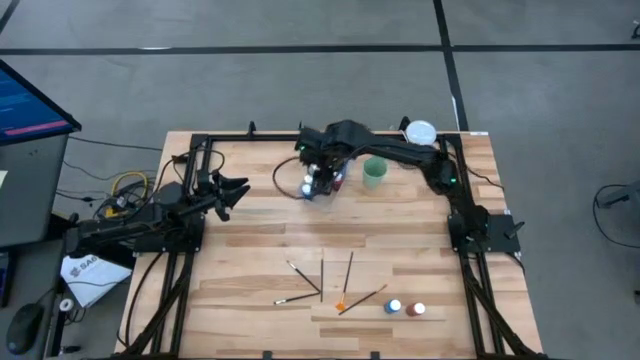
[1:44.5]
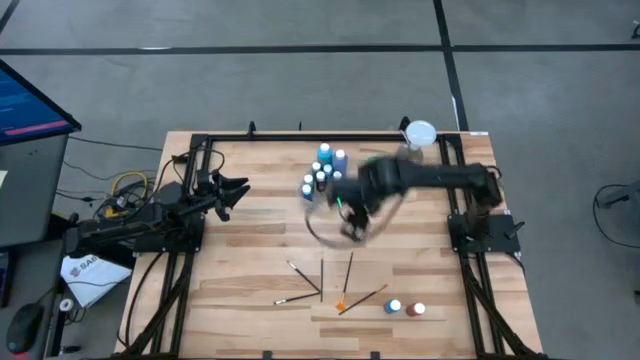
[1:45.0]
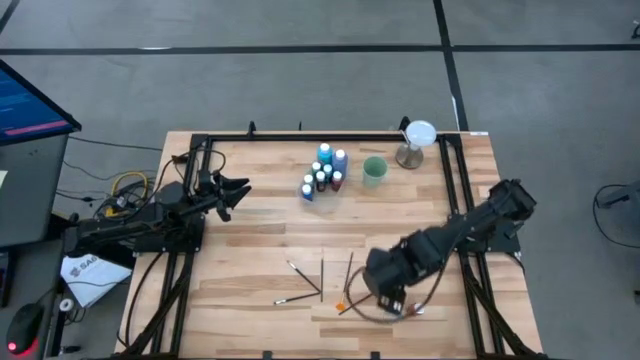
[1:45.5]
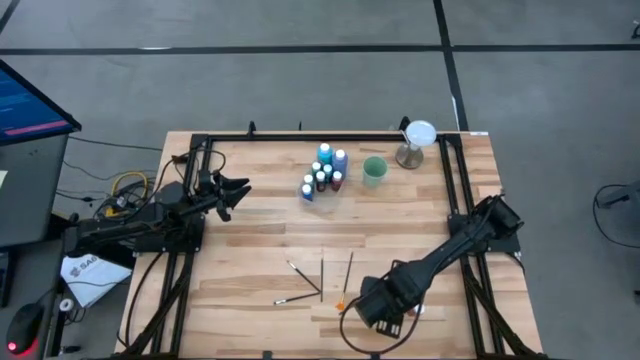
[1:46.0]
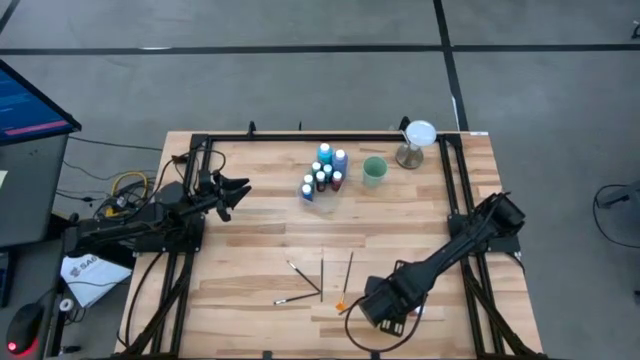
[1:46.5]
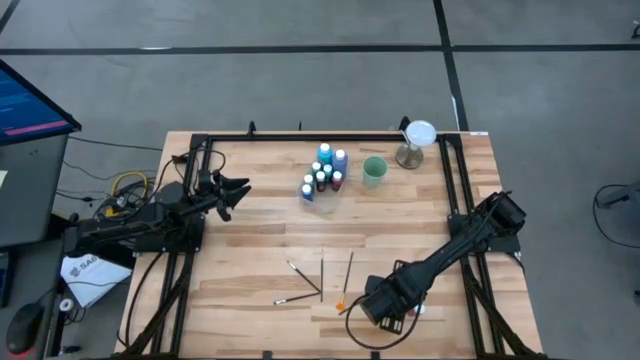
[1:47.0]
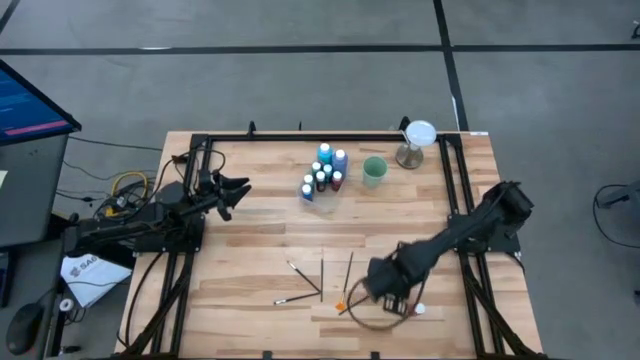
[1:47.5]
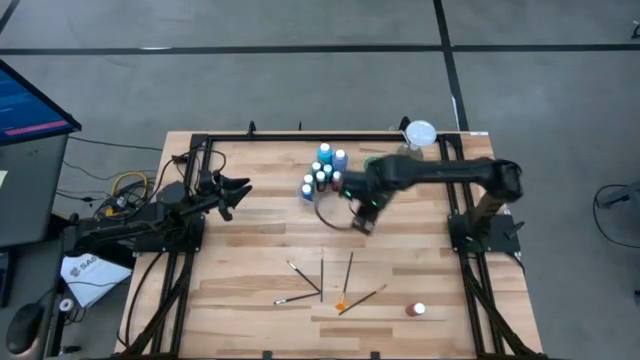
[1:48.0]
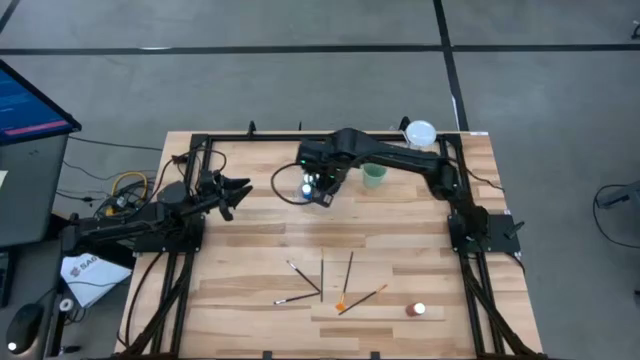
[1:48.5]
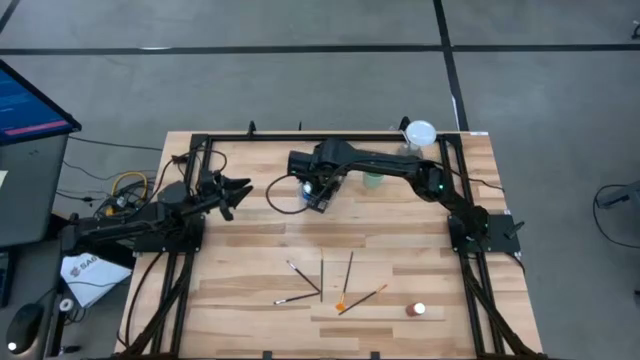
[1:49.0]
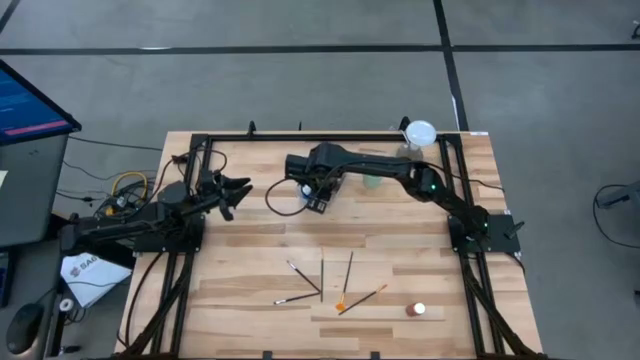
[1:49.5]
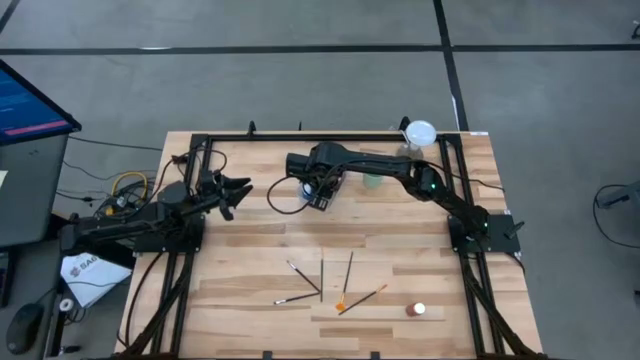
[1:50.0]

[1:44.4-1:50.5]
Task: Pick & Place Paint Supplies
Put the small light blue paint bottle into the transparent bin

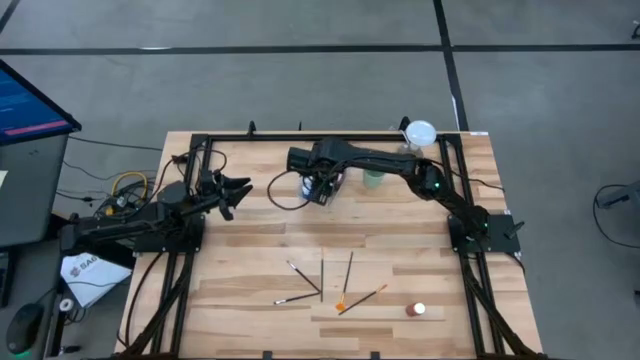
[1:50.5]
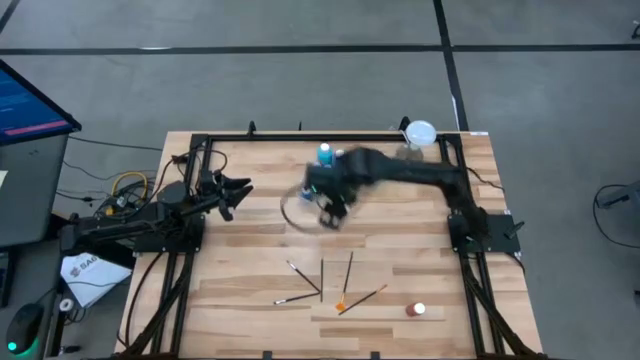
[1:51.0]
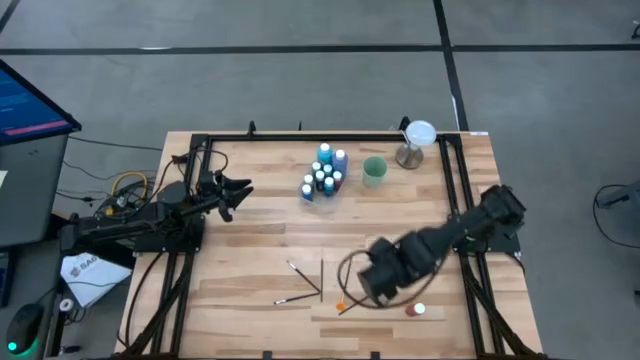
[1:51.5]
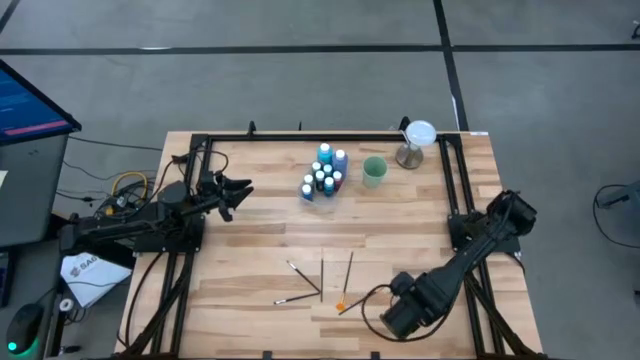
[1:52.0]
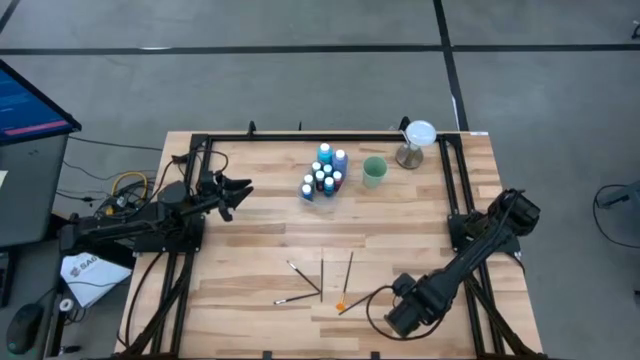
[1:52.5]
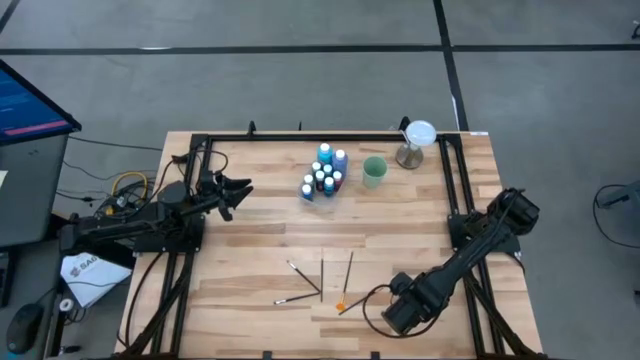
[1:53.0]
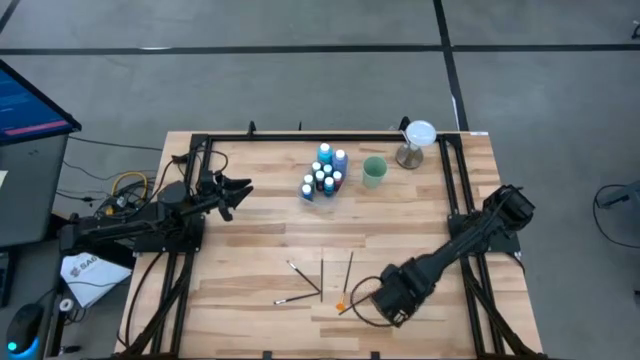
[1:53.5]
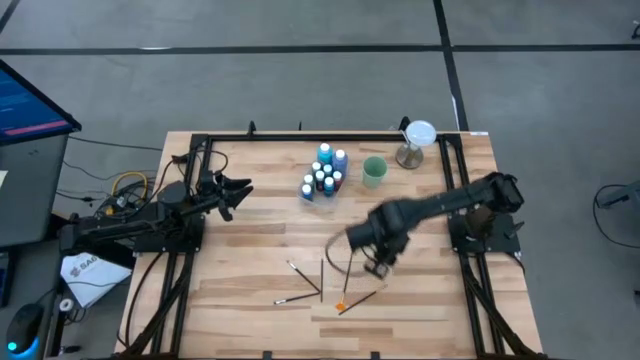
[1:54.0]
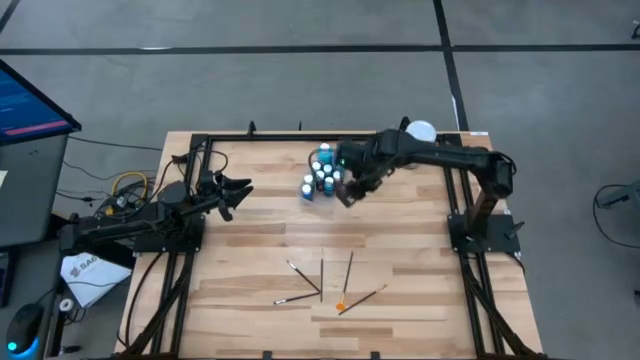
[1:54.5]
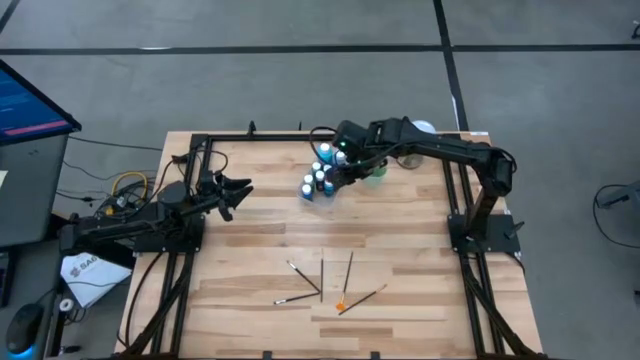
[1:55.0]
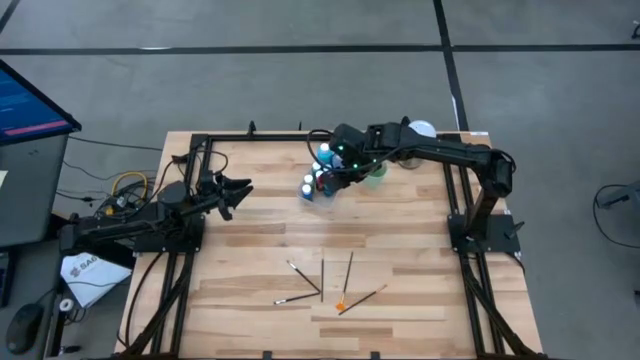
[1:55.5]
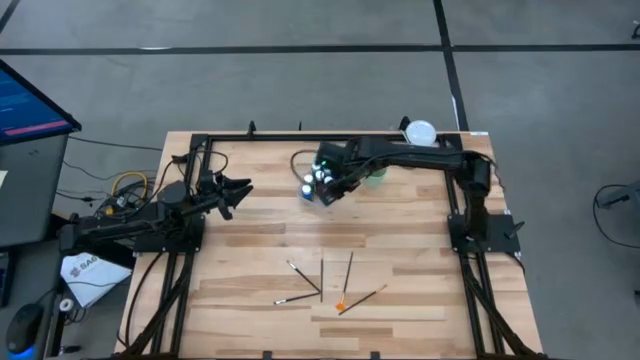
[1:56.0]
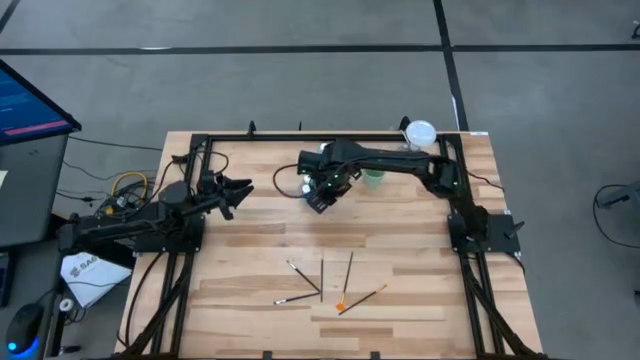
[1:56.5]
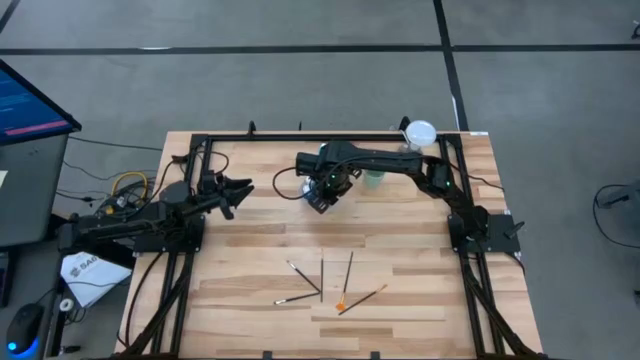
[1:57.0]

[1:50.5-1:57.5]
Put the small red paint bottle into the transparent bin

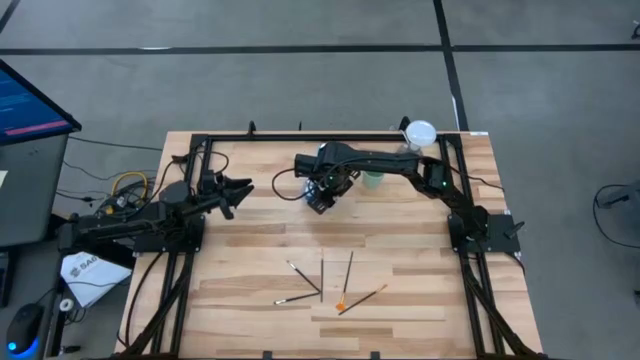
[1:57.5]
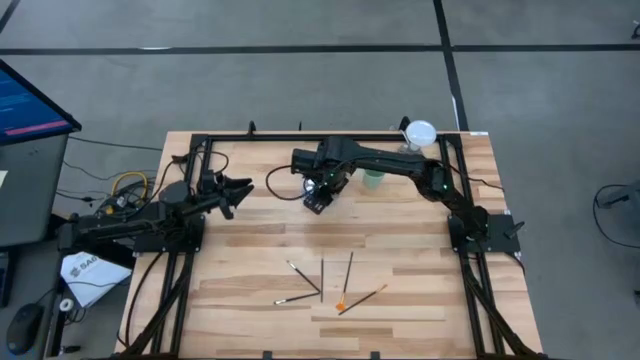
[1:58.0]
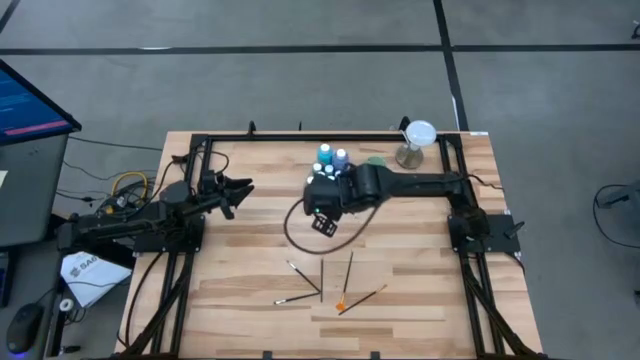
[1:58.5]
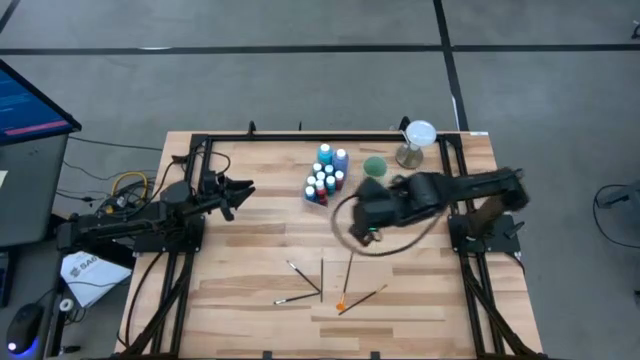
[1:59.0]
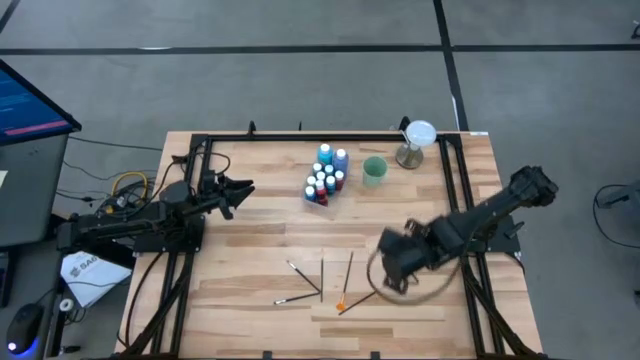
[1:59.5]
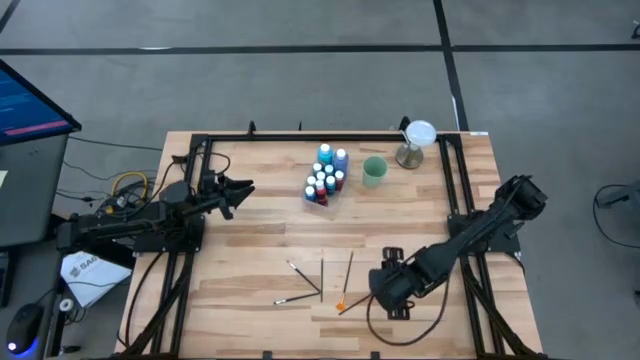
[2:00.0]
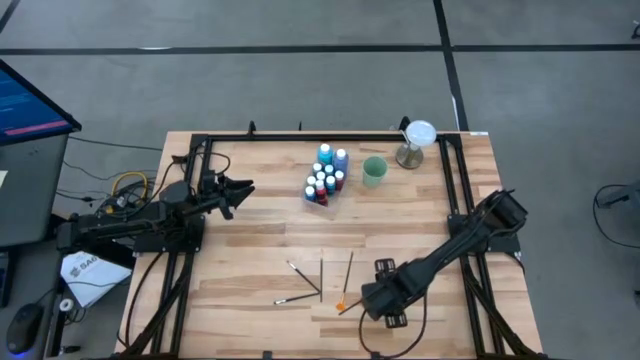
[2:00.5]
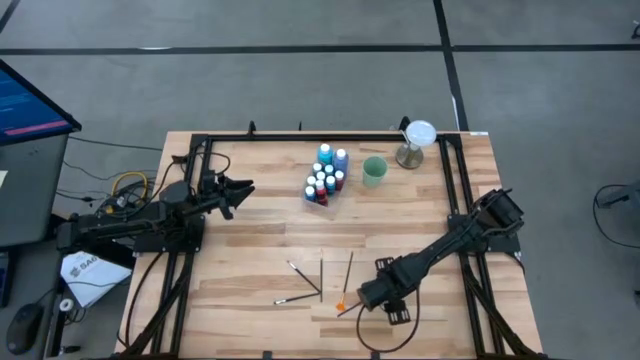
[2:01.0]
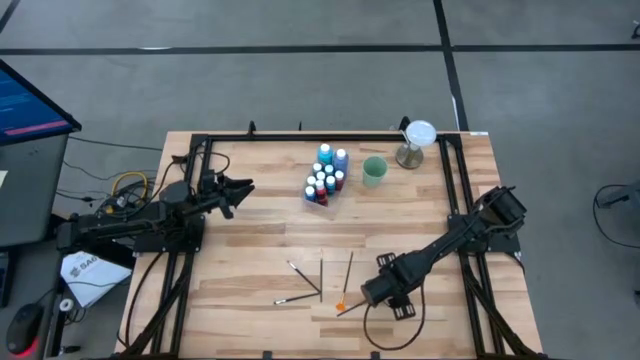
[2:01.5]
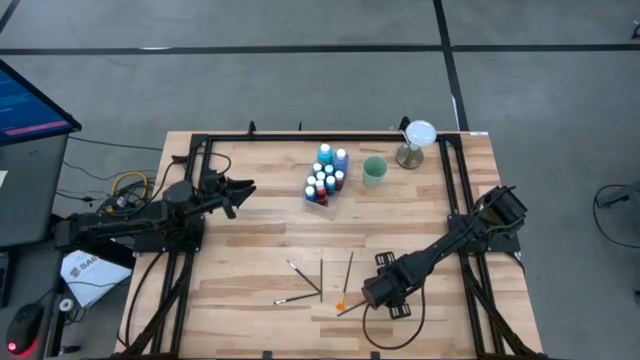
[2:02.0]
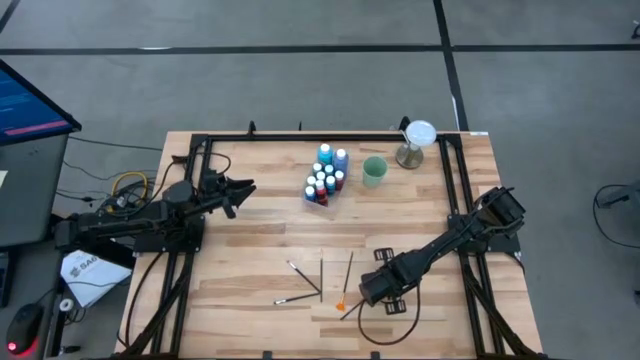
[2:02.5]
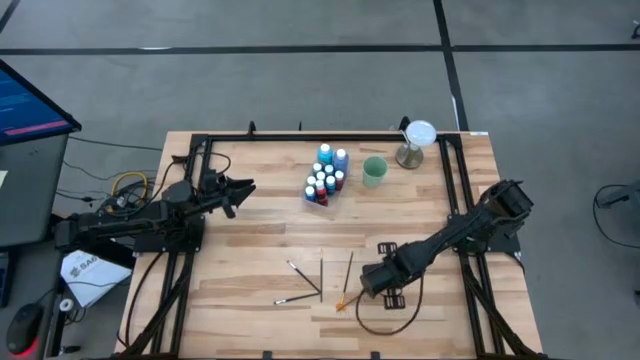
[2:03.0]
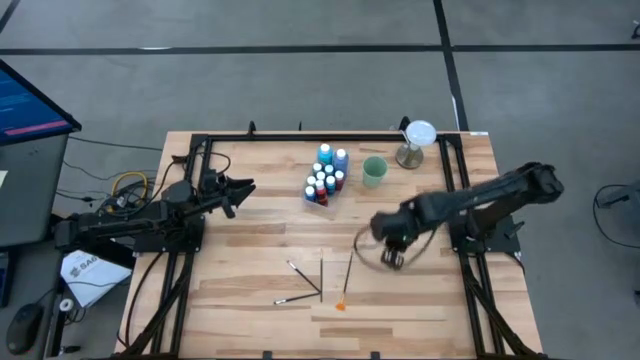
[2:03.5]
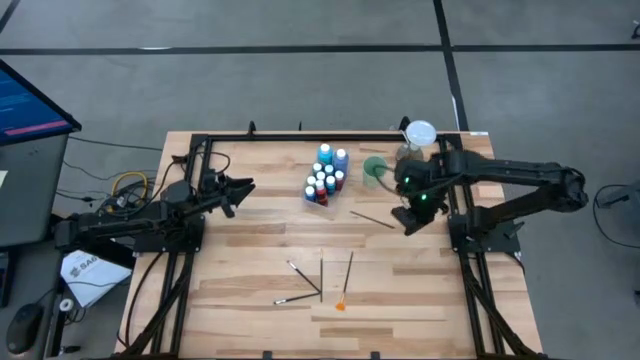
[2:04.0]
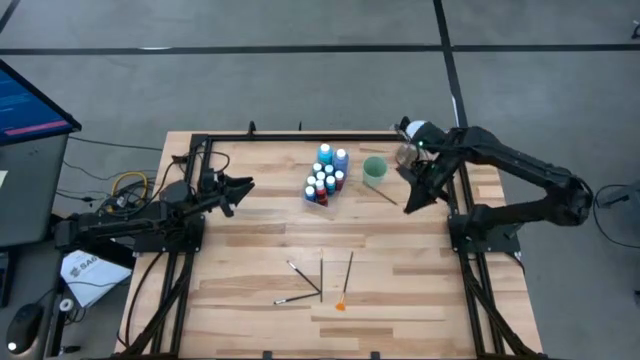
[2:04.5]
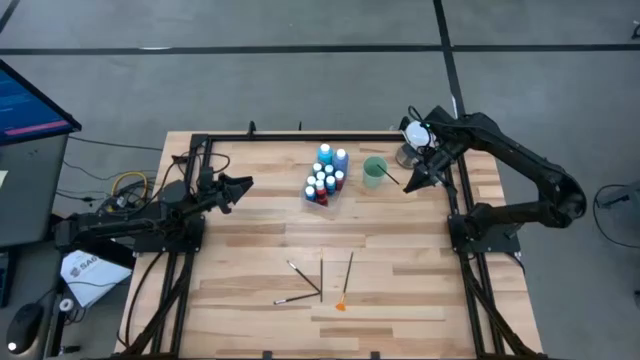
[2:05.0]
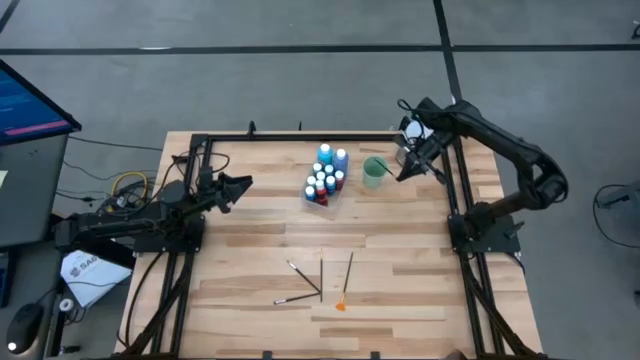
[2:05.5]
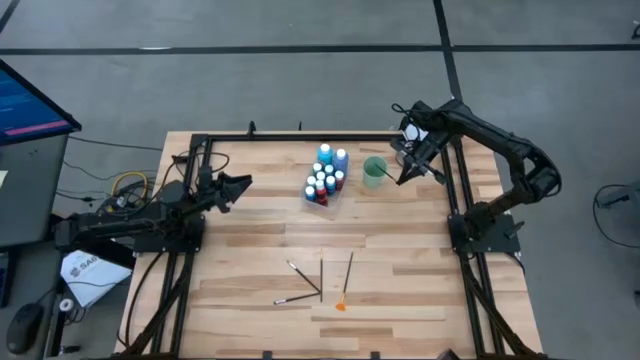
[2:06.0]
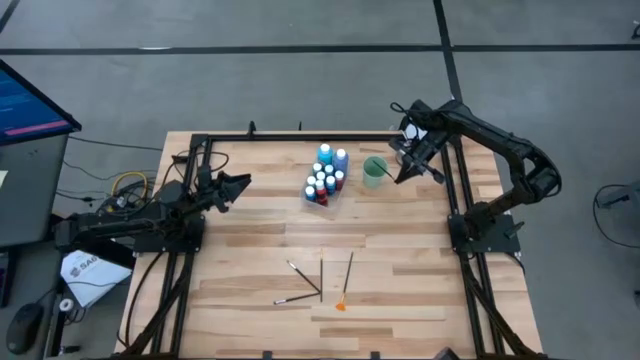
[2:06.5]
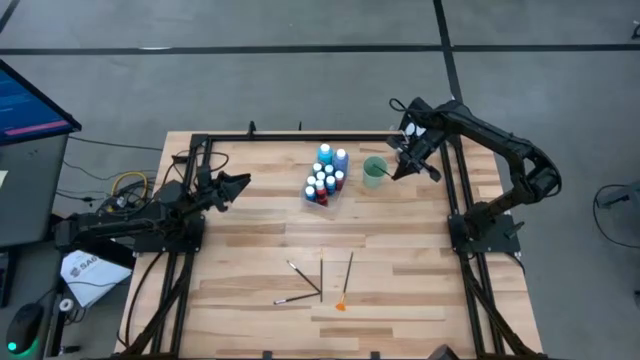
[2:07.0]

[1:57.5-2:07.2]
Put the right orange paint brush into the green cup
